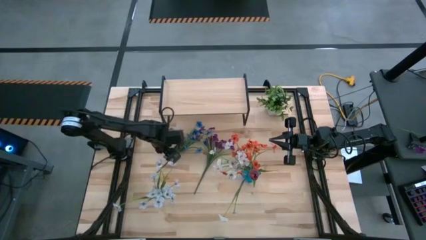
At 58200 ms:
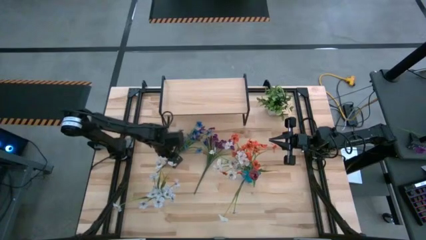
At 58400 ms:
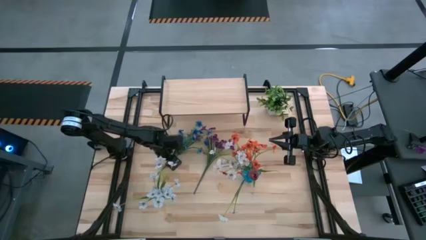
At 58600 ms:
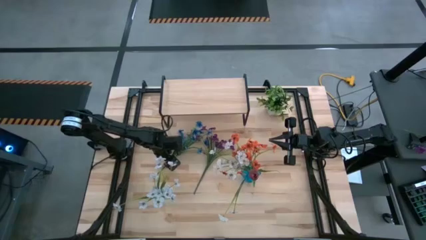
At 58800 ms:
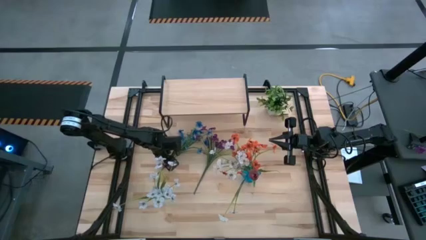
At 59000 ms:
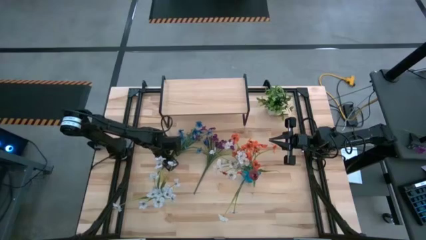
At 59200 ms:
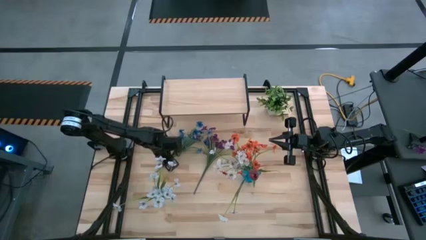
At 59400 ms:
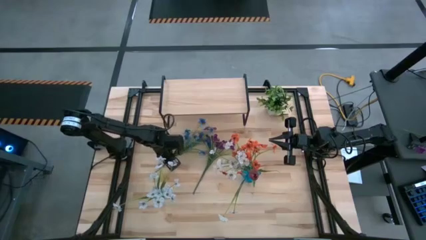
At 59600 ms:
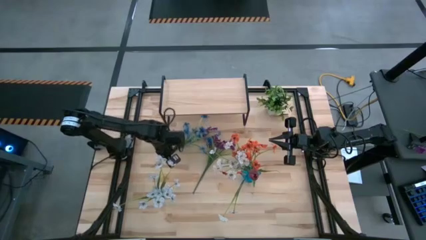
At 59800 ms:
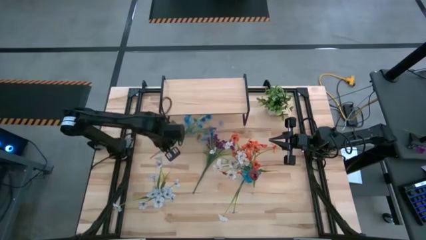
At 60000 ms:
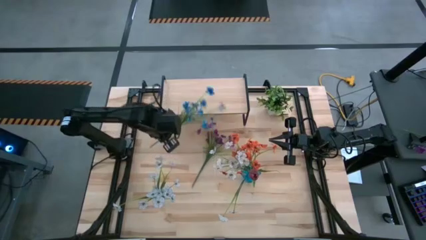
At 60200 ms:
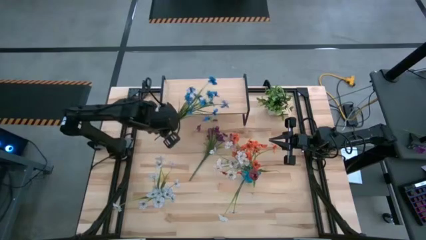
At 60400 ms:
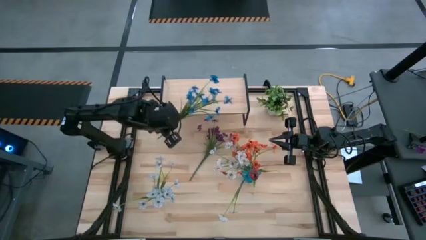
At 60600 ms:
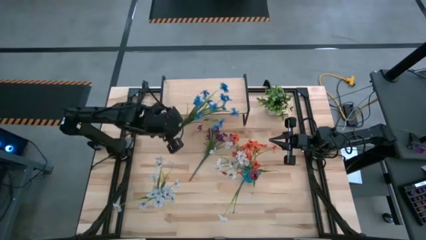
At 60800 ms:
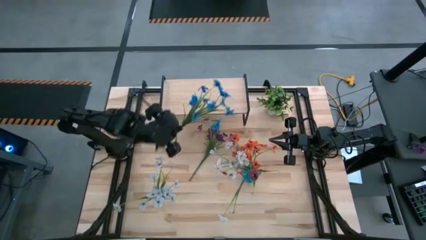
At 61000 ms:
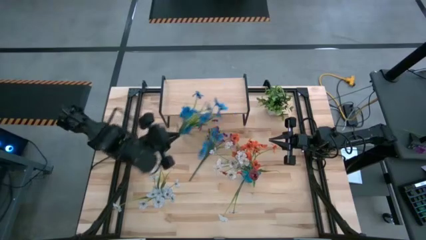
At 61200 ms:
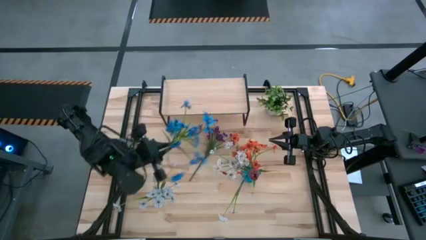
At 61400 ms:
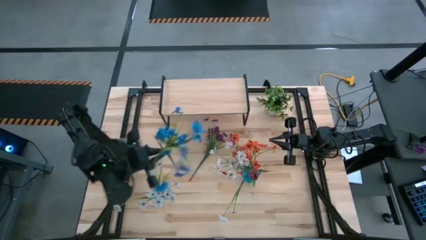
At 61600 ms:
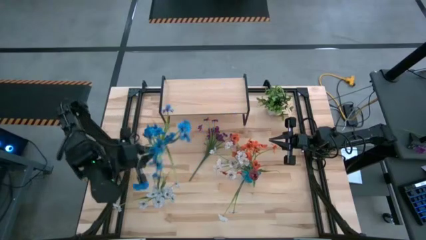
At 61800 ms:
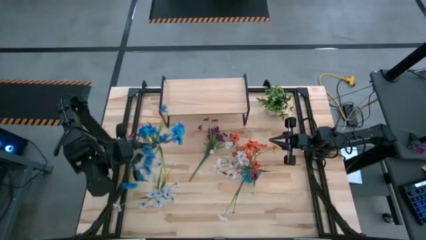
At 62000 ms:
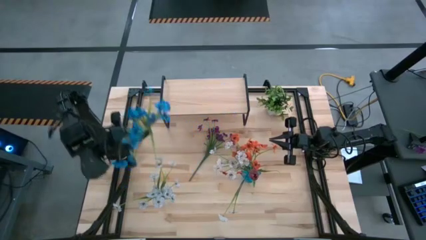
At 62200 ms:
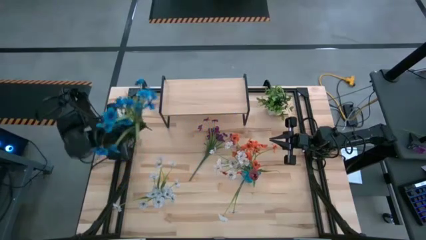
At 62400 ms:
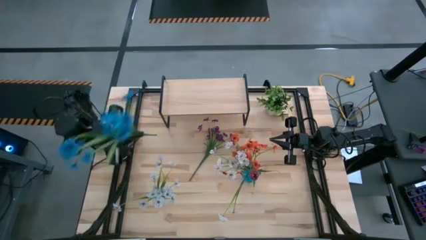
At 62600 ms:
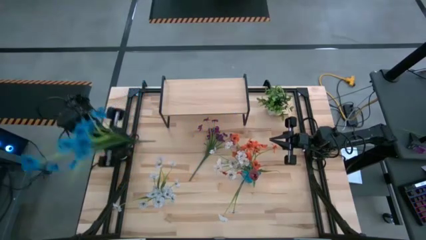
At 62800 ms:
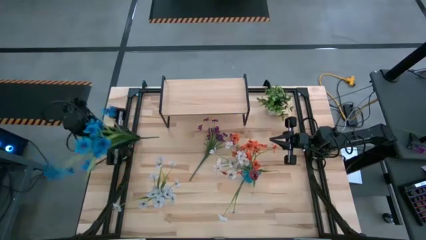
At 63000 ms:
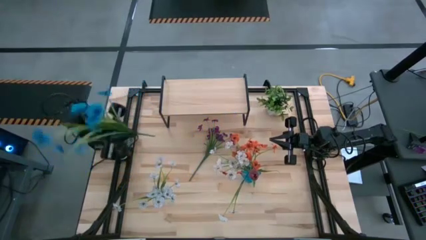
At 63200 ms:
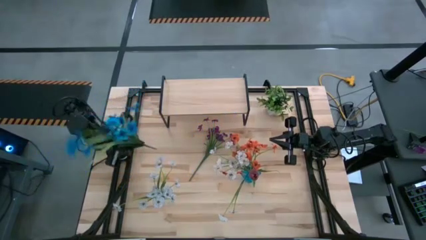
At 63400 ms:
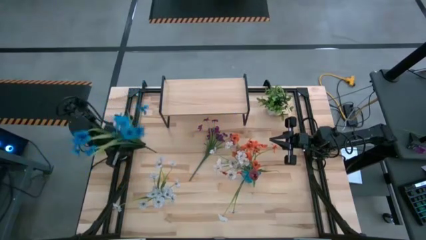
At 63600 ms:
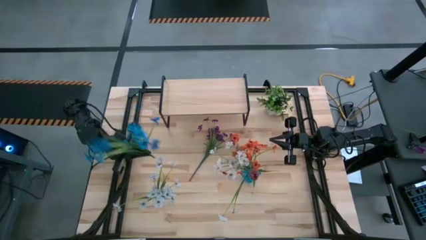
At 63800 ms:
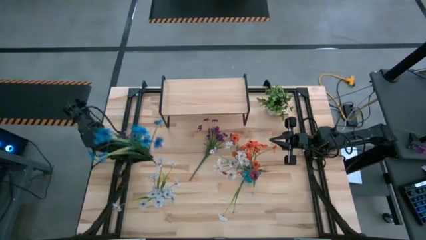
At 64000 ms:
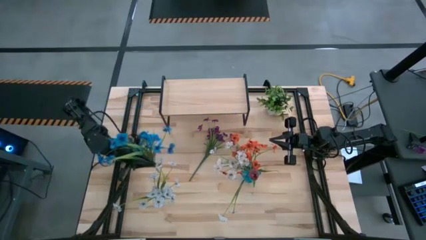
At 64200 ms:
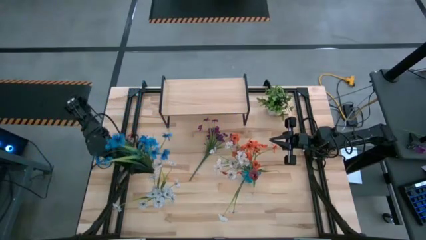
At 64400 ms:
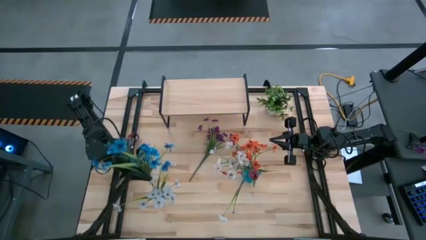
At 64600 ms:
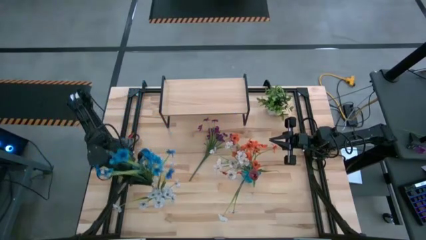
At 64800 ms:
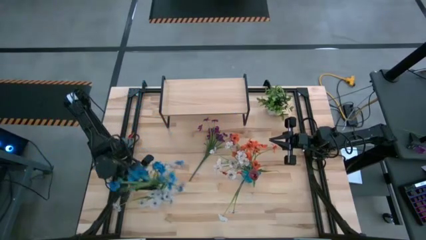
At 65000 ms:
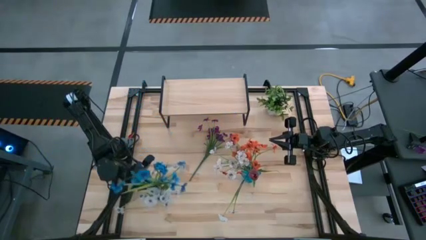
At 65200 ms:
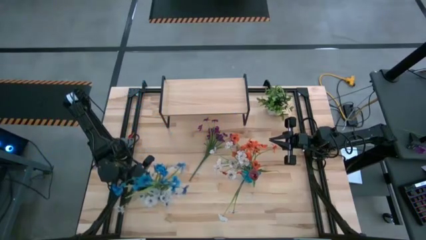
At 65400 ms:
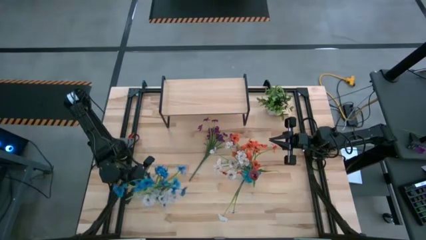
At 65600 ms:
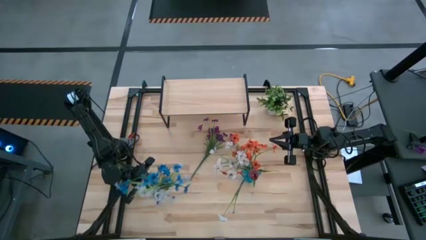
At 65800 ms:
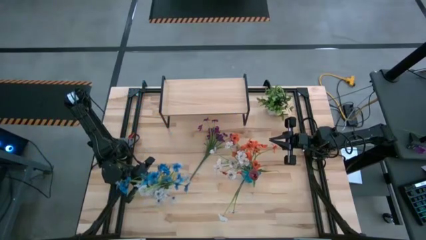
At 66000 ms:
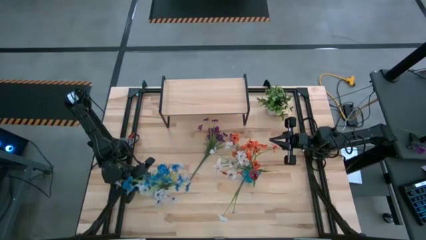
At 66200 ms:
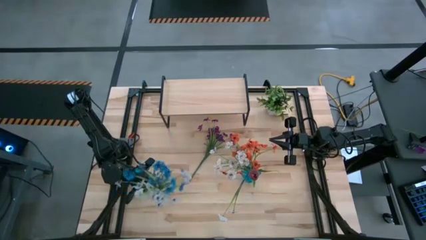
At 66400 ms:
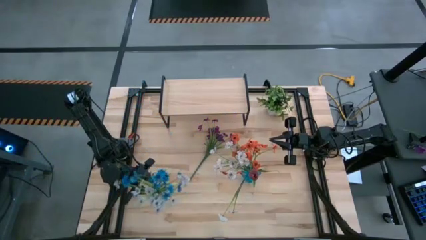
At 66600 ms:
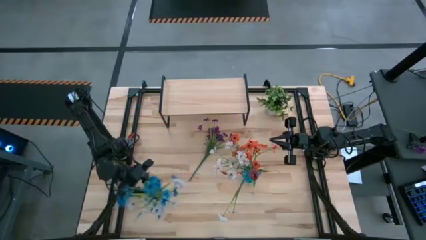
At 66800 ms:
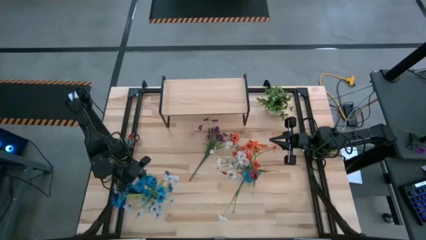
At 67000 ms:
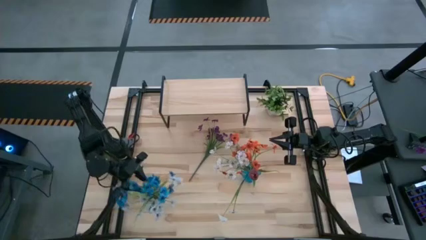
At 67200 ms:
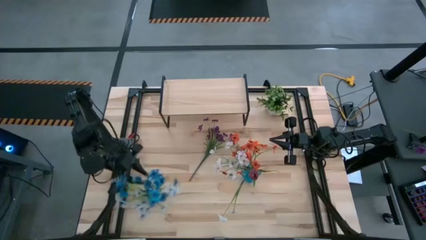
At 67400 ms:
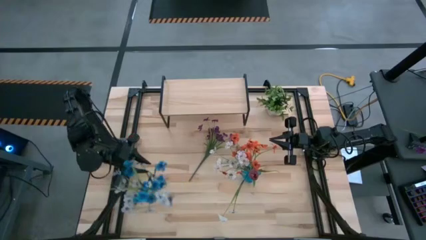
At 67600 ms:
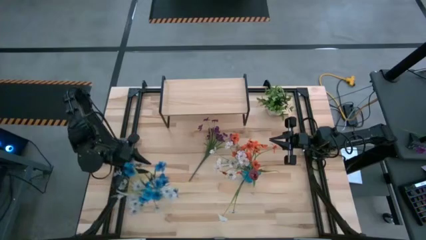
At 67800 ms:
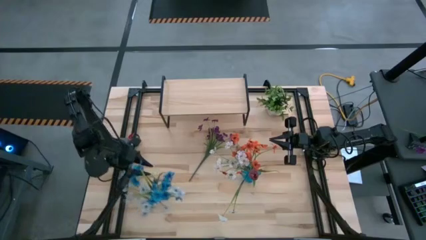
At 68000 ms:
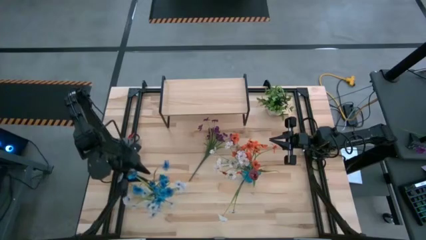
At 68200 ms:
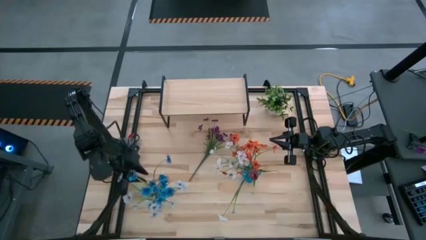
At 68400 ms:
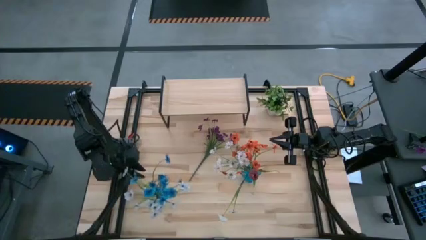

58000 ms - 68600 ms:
Task: Pick and place flowers into a vace then onto a shelf
Put the blue flowers into the transparent vase

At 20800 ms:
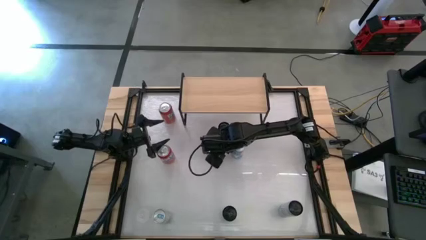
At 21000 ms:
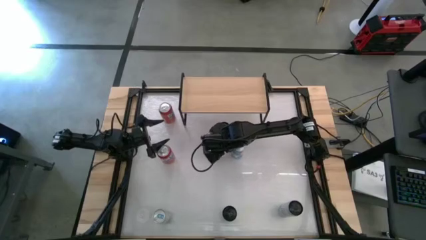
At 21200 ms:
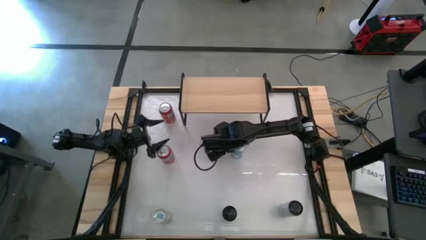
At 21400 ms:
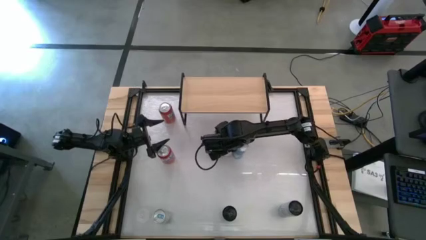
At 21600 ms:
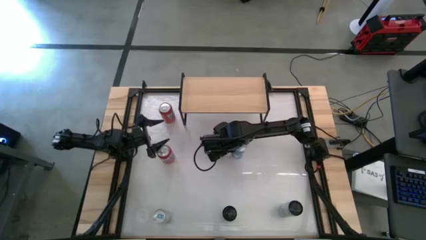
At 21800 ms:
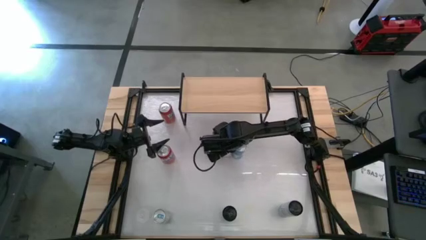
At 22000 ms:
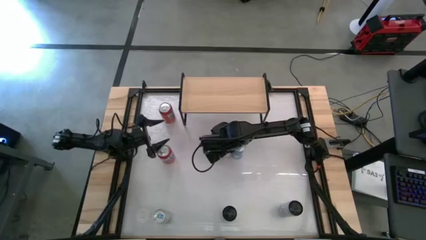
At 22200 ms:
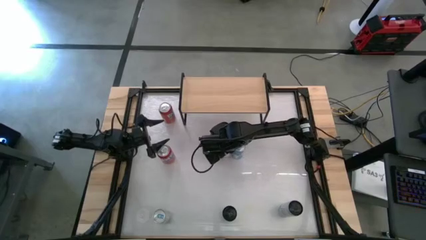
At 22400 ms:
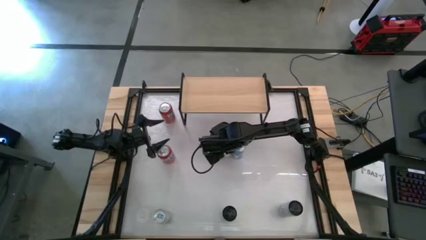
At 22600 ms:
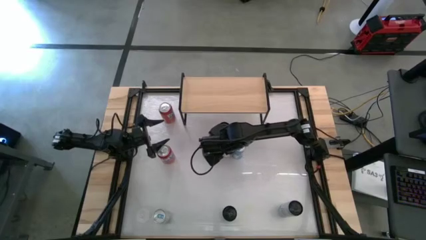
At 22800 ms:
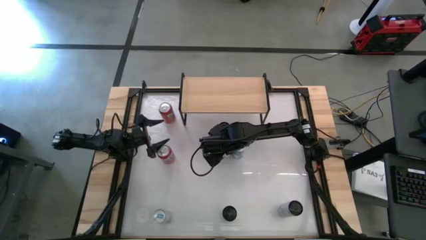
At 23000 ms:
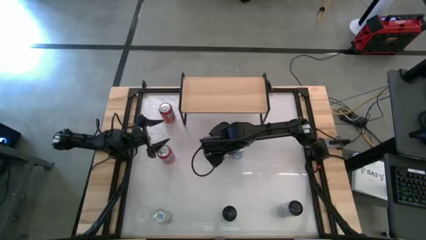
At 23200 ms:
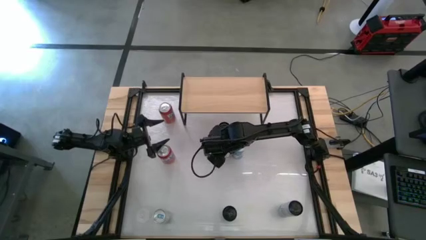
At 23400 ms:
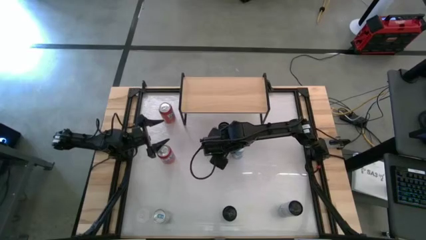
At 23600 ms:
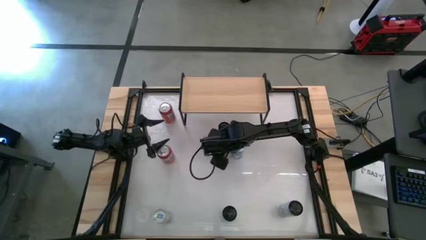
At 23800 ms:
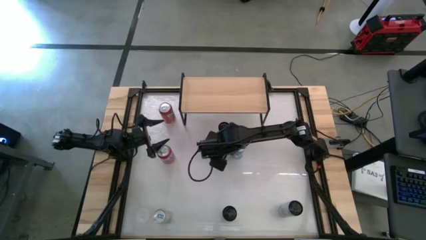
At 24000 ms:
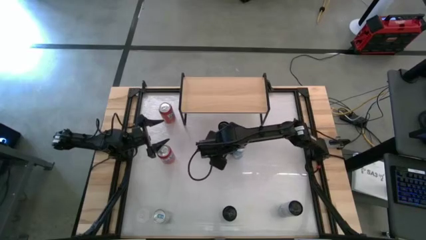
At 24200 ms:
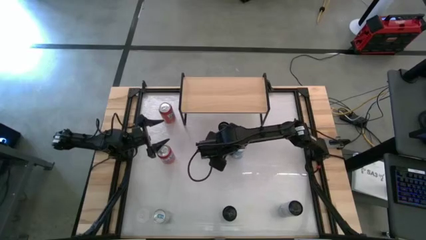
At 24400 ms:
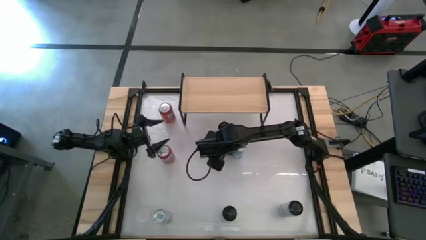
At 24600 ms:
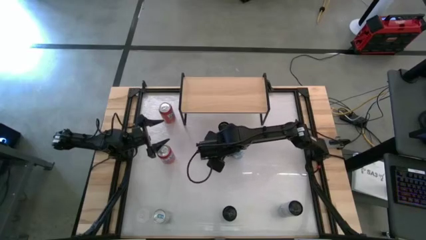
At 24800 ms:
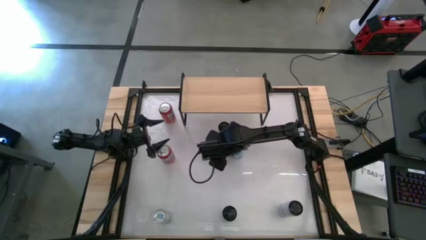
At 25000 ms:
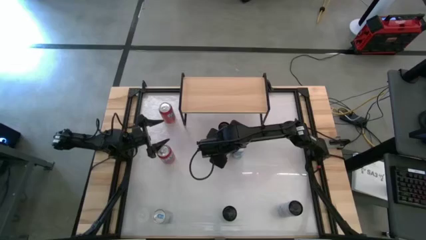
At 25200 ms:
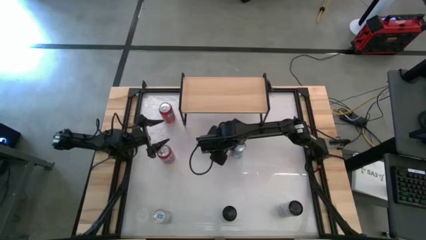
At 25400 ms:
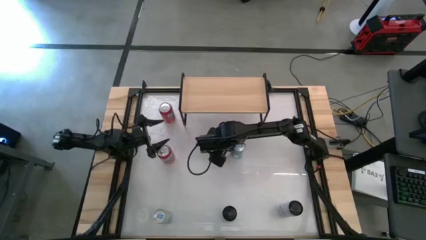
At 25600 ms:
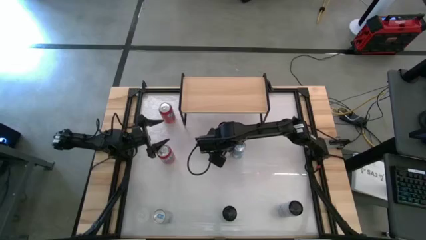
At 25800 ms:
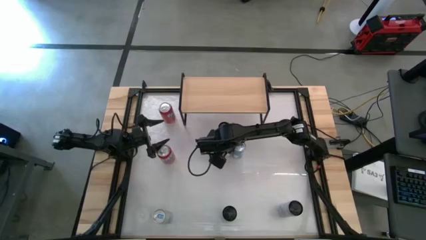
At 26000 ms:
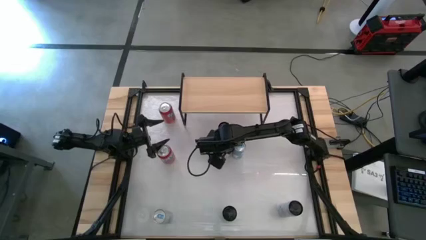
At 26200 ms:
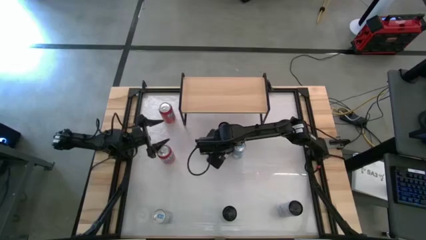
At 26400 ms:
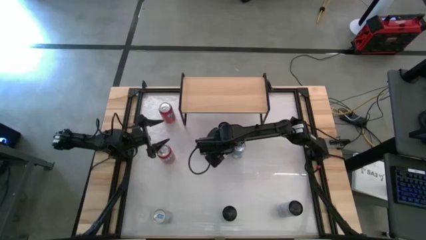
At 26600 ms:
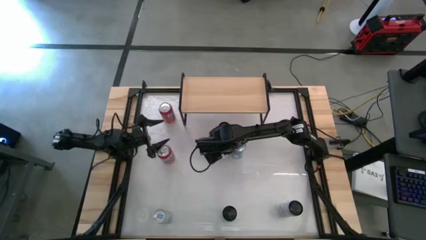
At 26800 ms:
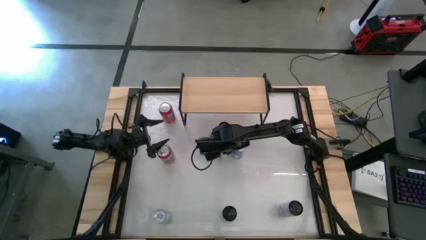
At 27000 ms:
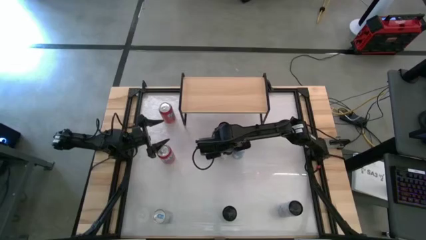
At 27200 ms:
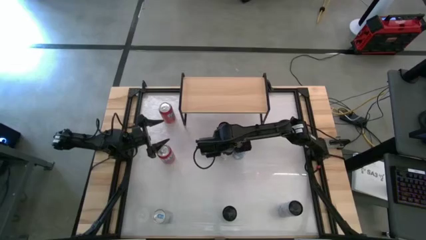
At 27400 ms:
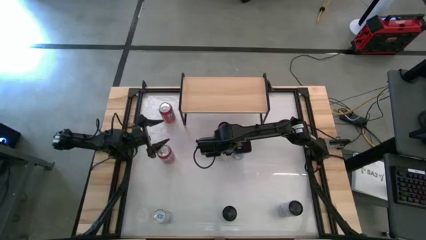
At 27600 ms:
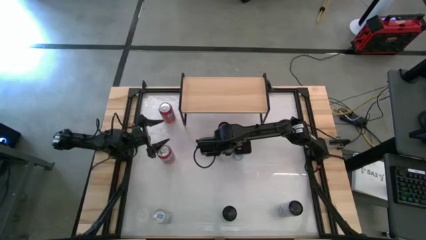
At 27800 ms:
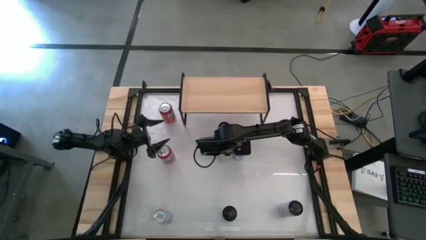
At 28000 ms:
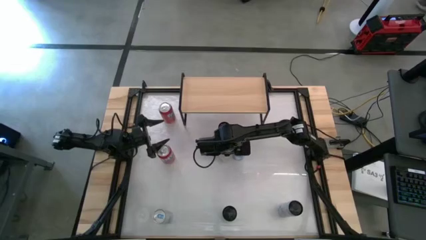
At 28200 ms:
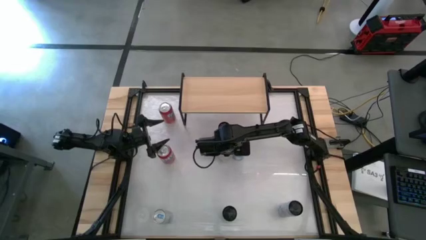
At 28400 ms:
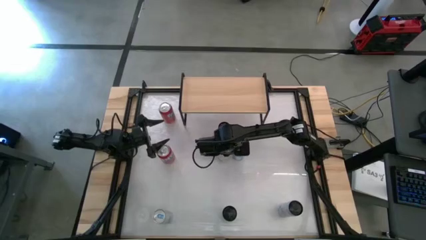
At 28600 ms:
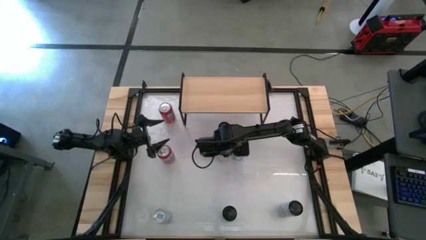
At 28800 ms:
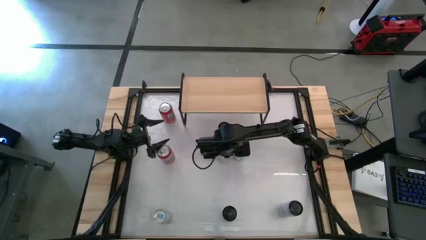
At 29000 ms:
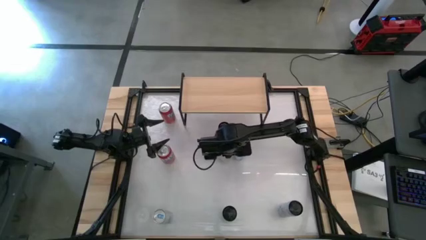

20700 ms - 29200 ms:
Task: Place canned beverage on shelf
Adjust the white pink soda can
